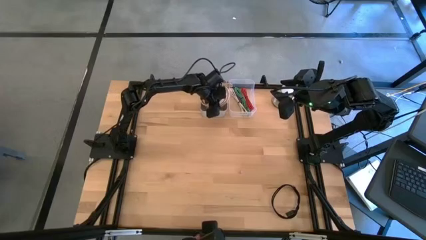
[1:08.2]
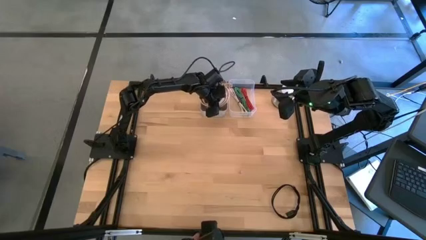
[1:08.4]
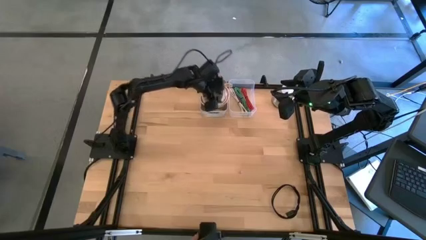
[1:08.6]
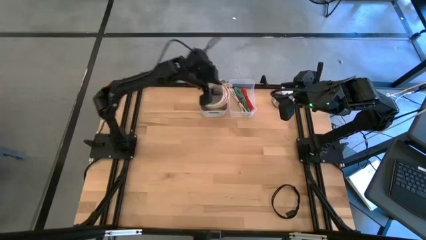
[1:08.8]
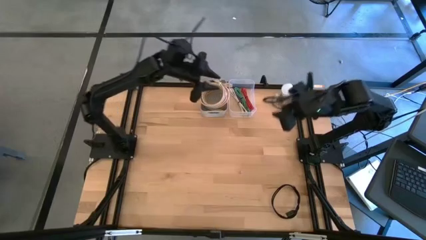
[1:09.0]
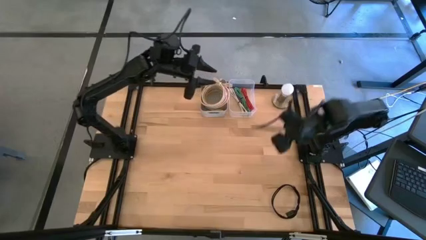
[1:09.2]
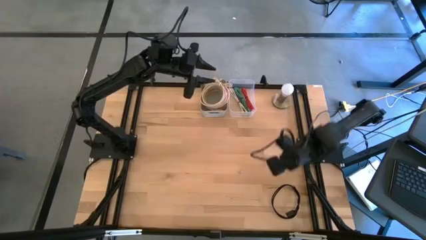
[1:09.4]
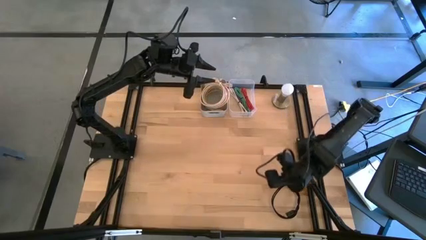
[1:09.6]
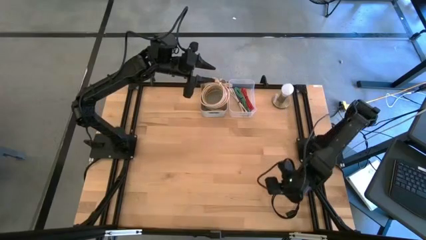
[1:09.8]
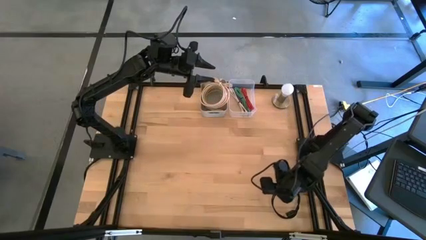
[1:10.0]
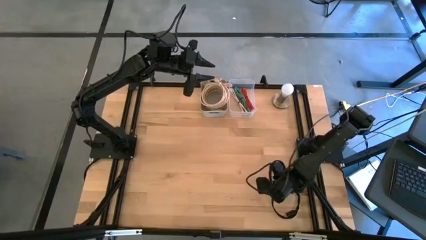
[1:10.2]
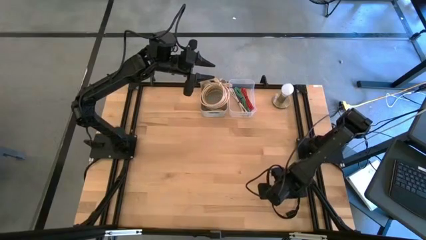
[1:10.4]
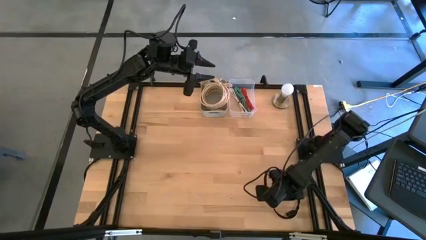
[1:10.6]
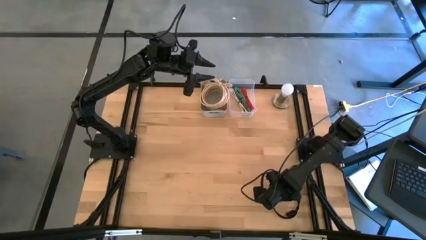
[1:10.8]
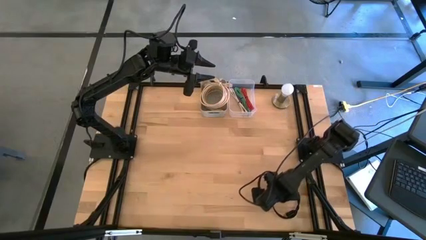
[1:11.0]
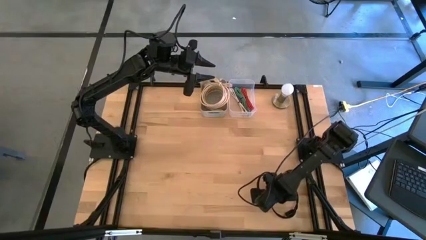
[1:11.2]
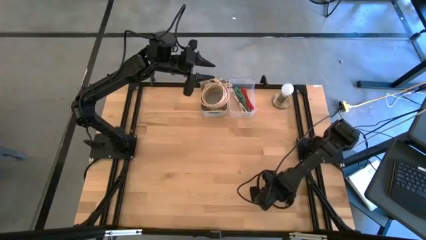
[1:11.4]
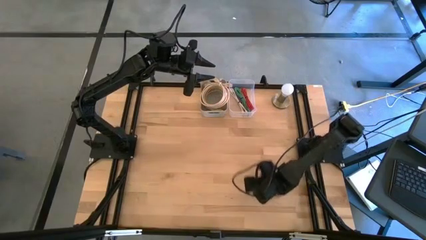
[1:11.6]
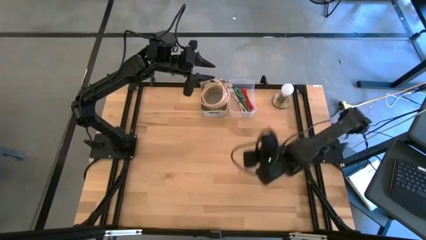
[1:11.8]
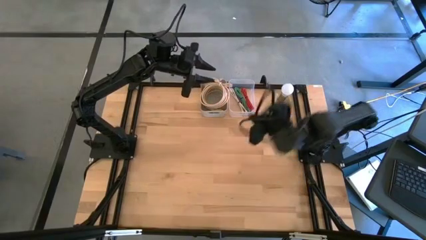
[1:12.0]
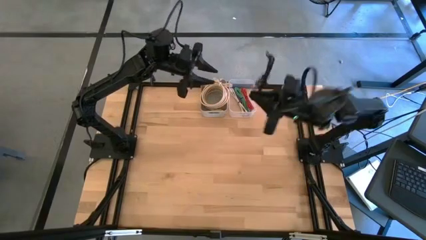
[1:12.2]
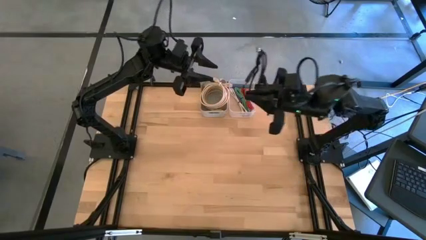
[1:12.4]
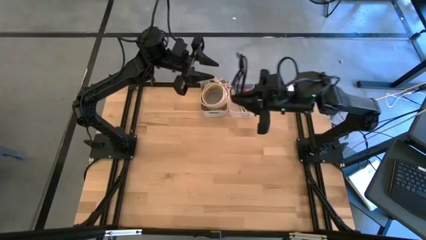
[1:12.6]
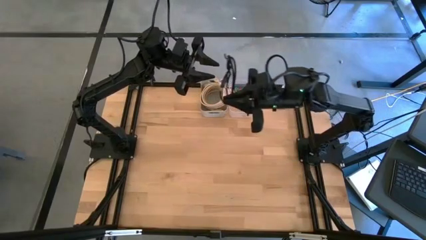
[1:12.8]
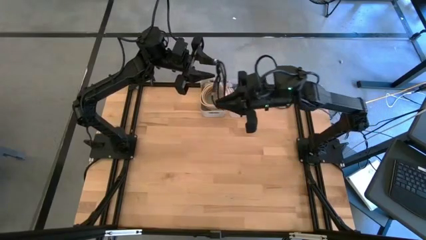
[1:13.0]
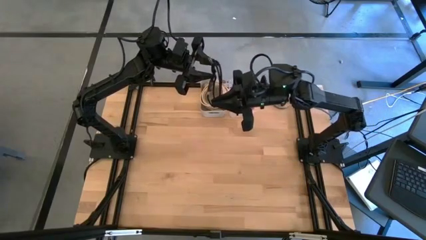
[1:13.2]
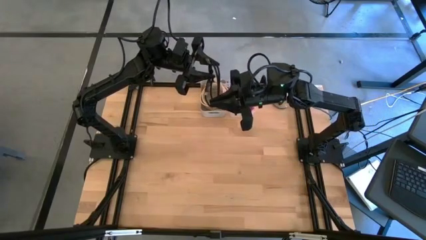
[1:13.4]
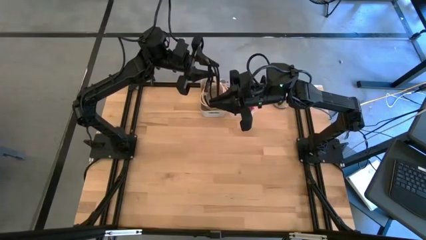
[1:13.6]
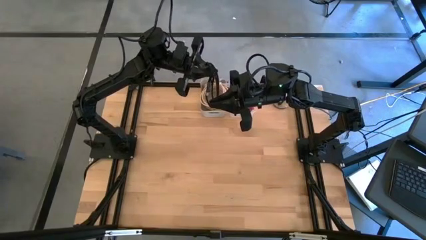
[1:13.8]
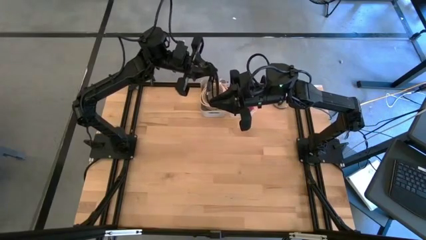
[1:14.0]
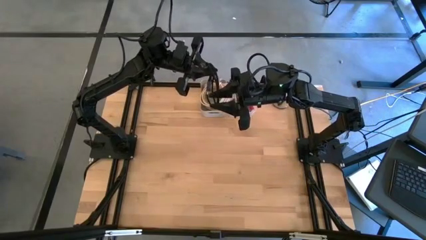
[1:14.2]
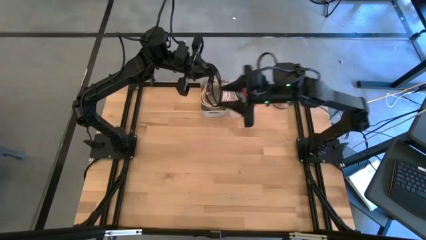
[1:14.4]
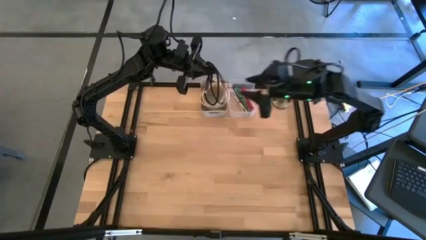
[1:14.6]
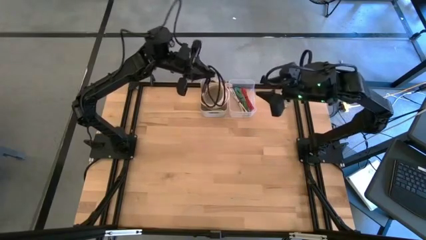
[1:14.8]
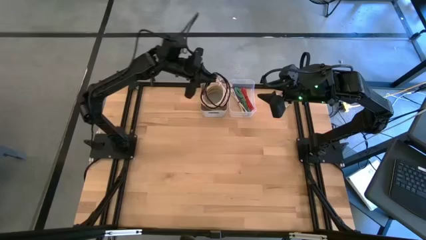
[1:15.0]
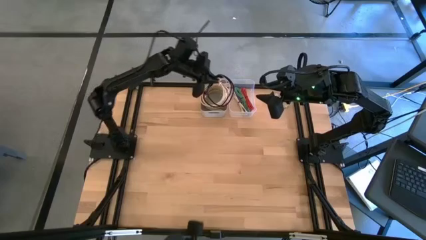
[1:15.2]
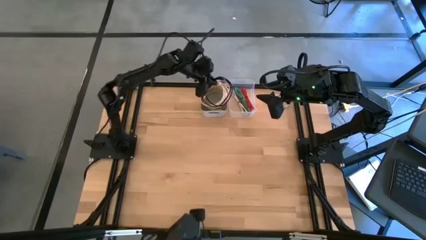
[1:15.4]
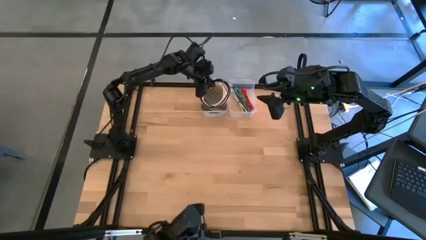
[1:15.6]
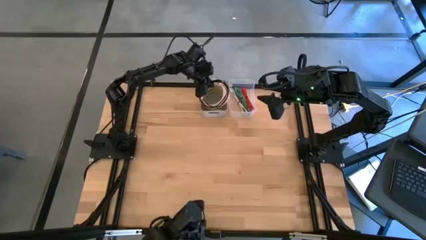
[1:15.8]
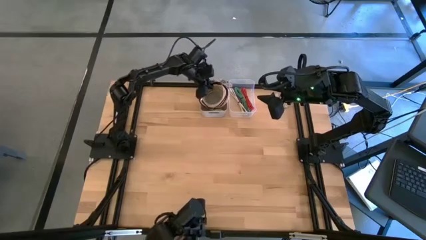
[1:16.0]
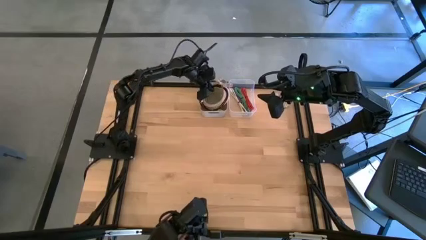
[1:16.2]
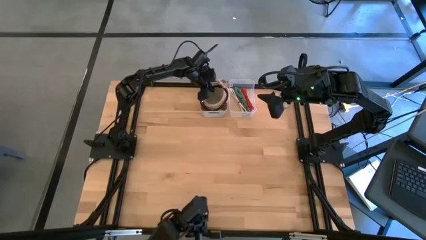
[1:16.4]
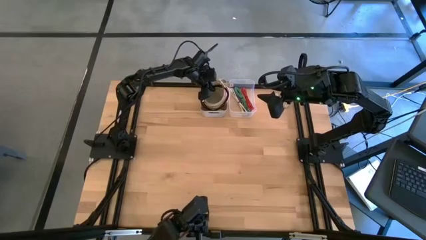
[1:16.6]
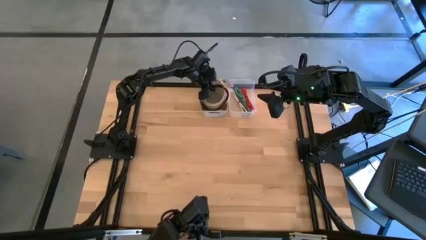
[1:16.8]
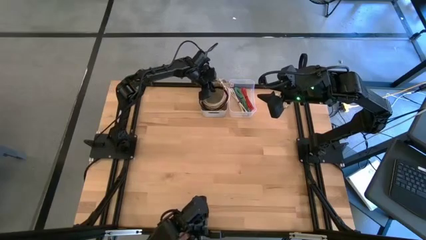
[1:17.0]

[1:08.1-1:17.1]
Put the black hdmi cable into the white bin

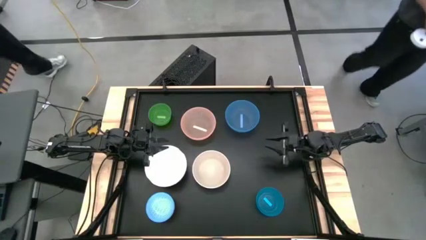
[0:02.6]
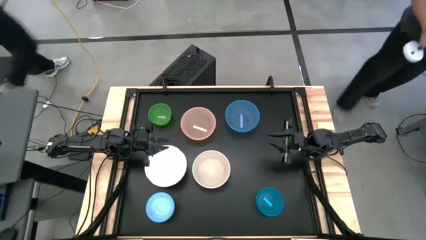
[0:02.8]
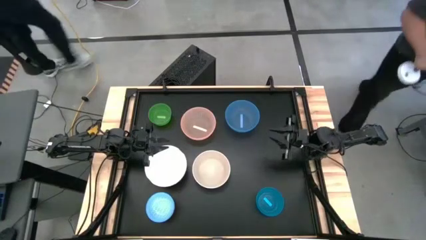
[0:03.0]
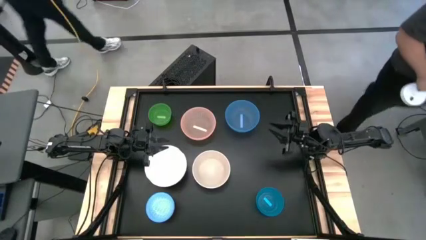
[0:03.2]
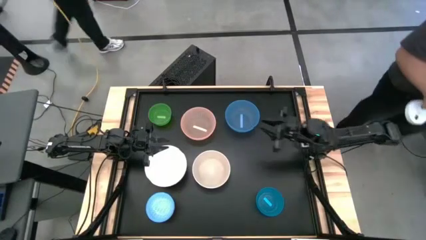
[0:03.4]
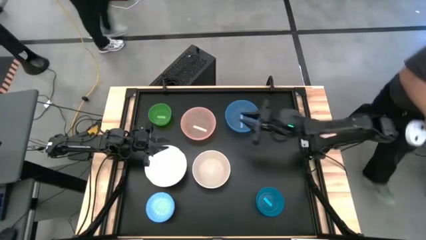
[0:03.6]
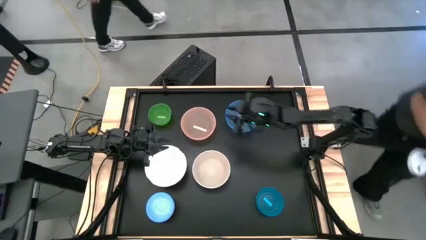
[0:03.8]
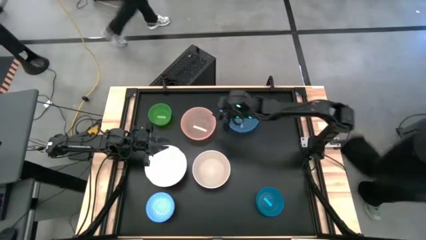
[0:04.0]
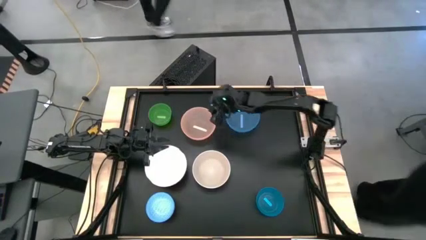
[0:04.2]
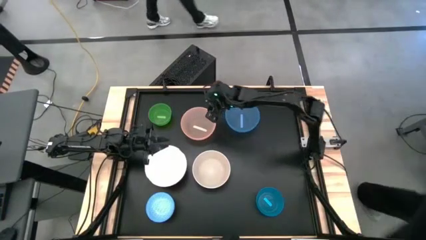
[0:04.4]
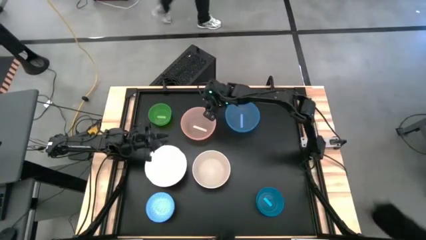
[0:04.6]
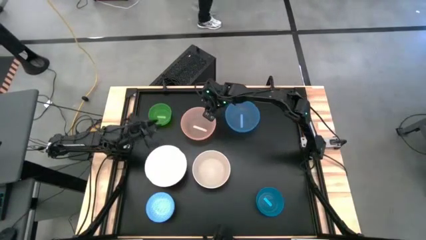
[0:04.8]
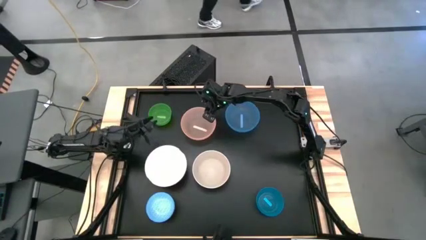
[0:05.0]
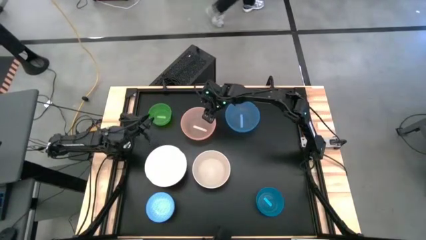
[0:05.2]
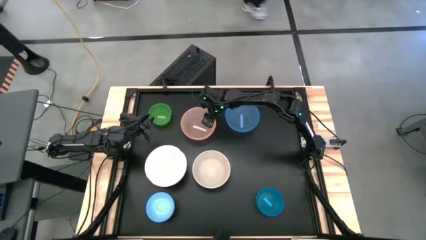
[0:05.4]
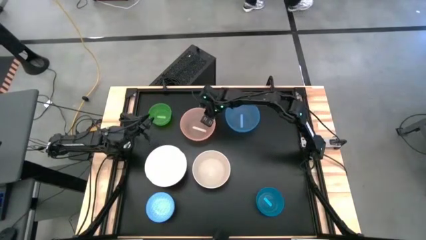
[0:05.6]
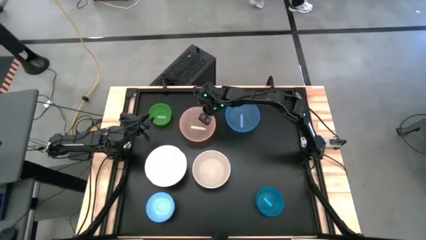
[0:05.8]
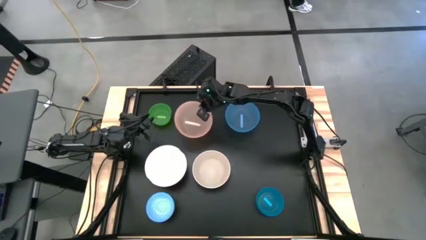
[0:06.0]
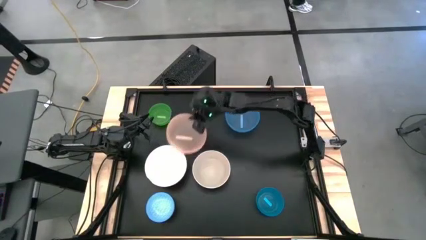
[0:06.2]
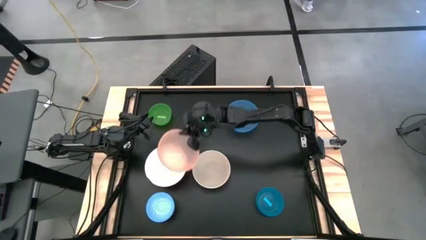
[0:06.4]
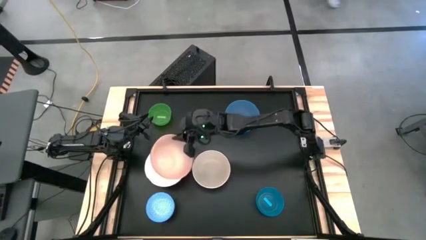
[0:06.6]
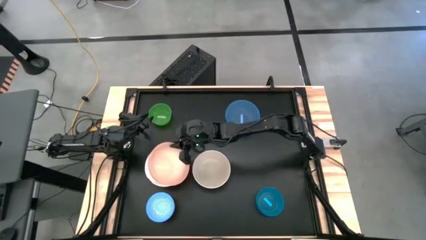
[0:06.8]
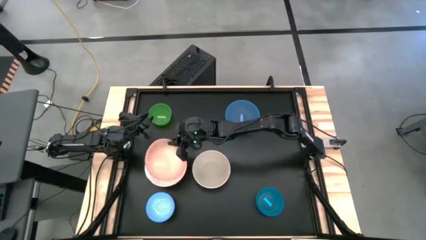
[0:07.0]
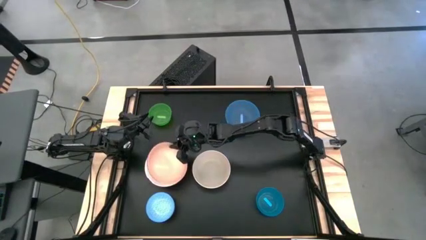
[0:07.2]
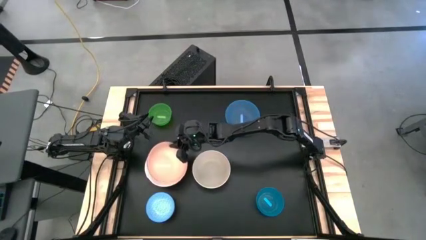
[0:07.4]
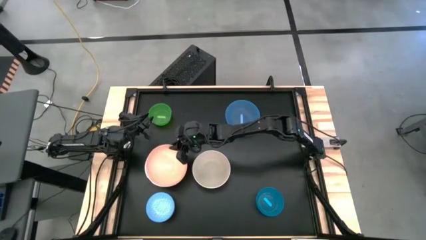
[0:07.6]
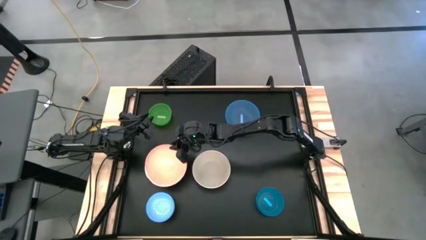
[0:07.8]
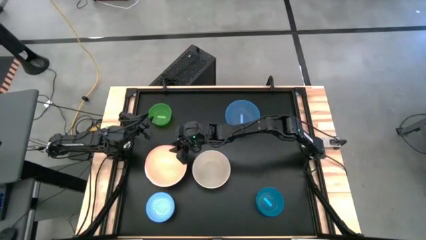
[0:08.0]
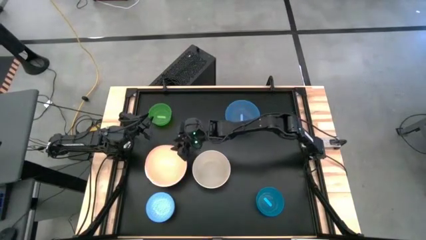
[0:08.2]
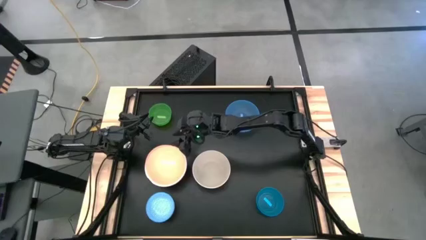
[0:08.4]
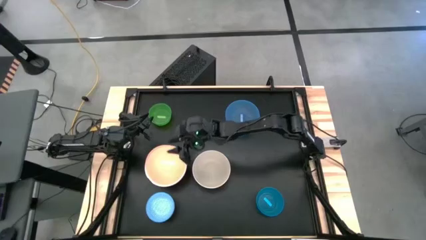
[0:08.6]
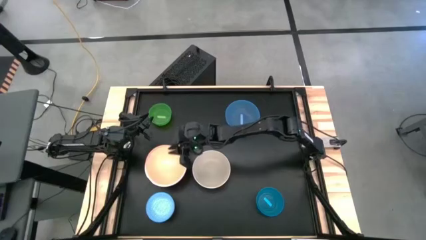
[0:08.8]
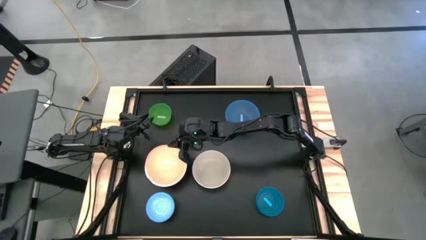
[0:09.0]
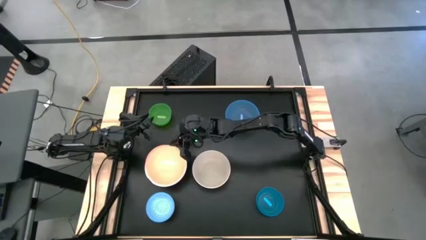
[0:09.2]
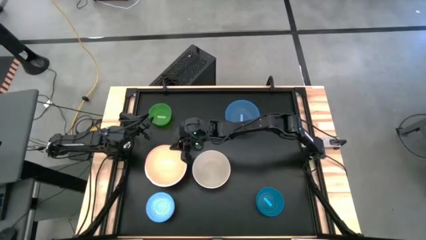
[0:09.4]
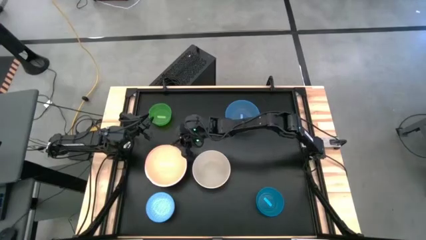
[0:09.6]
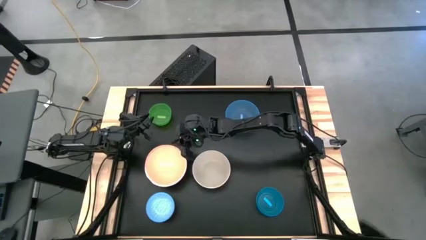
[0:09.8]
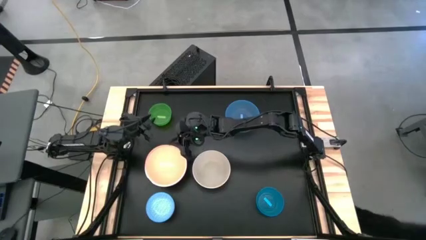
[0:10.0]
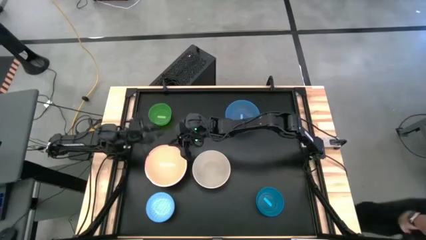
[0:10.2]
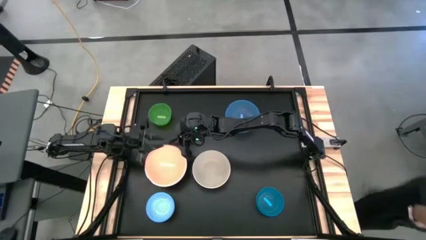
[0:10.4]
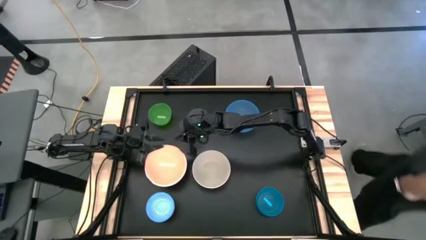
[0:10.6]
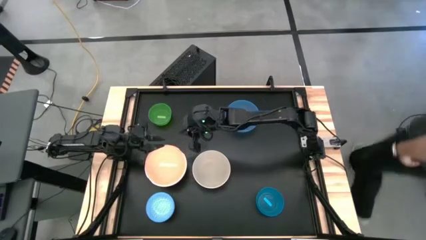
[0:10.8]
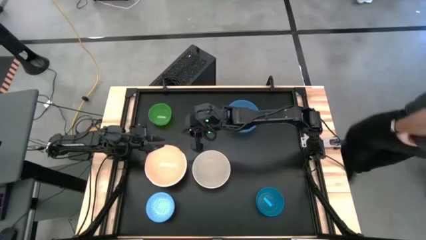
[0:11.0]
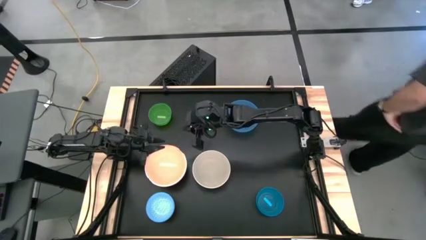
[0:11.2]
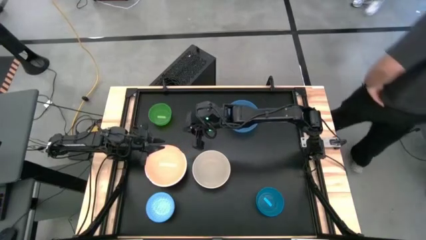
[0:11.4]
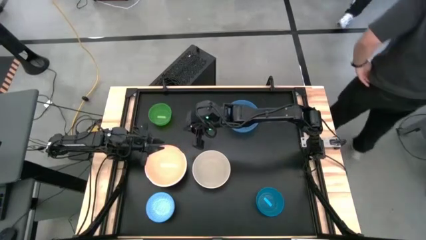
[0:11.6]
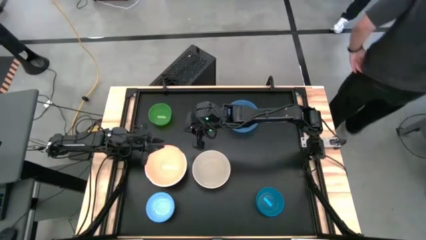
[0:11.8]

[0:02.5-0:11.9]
Stack the orange bowl on top of the white bowl
